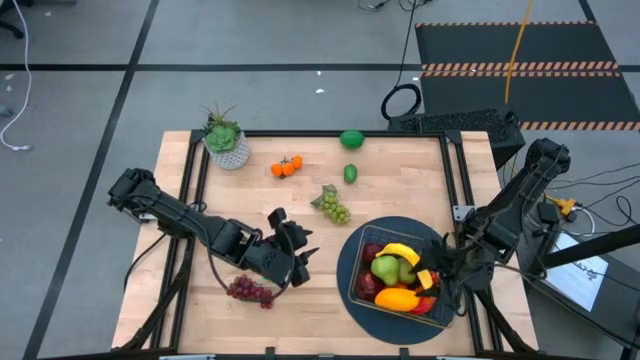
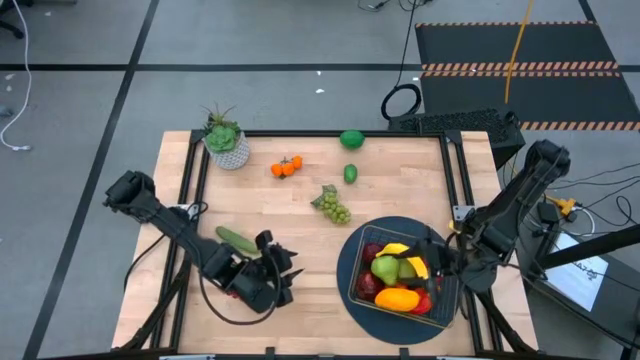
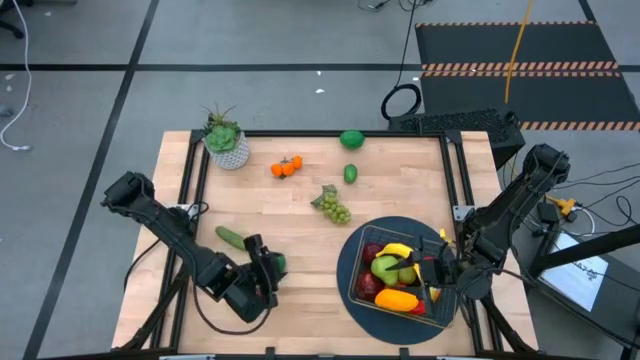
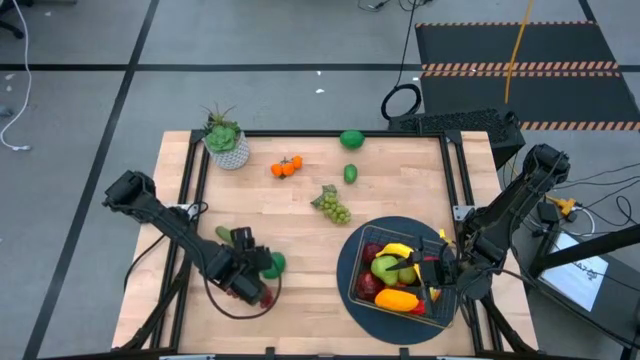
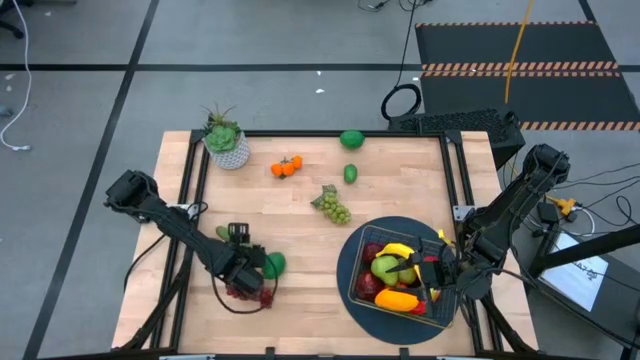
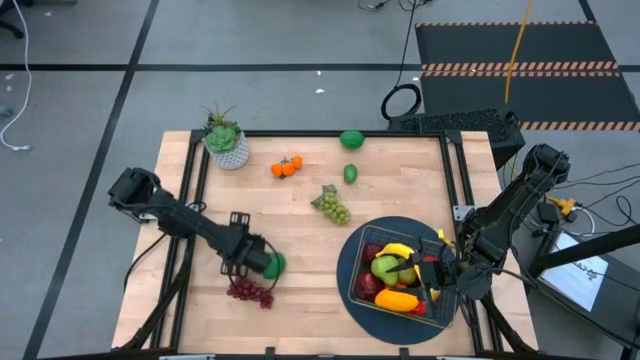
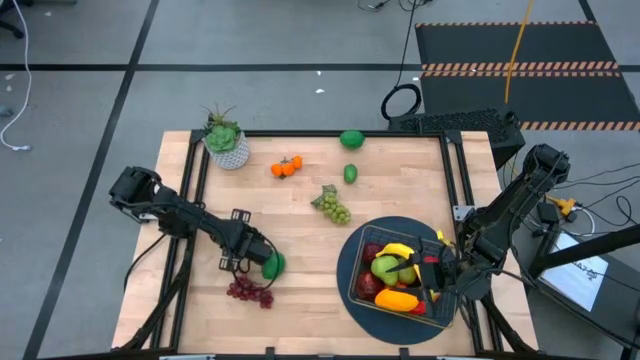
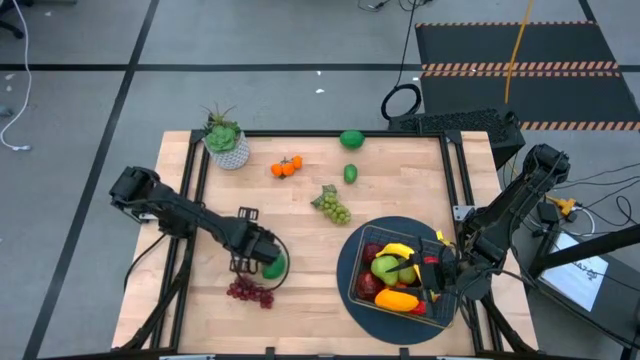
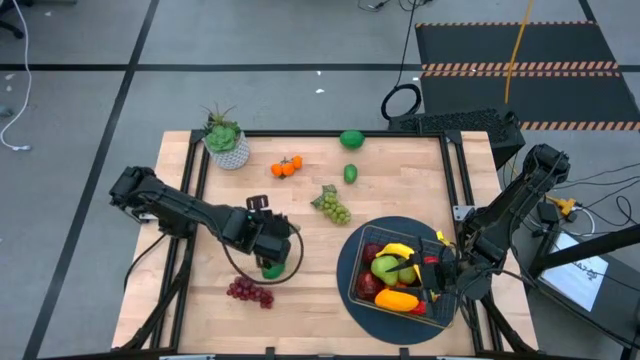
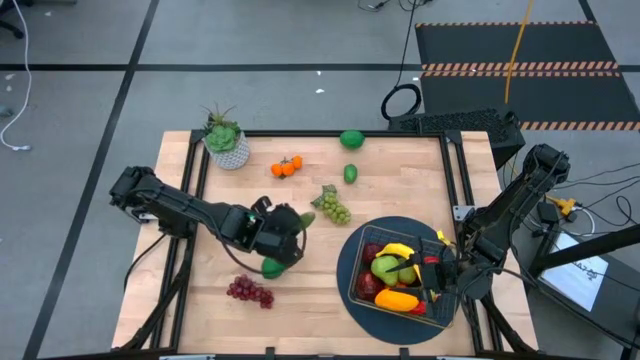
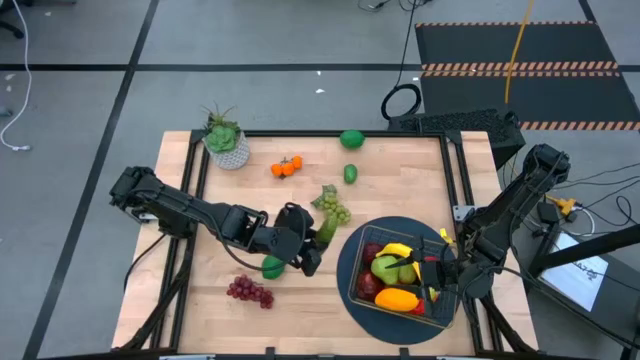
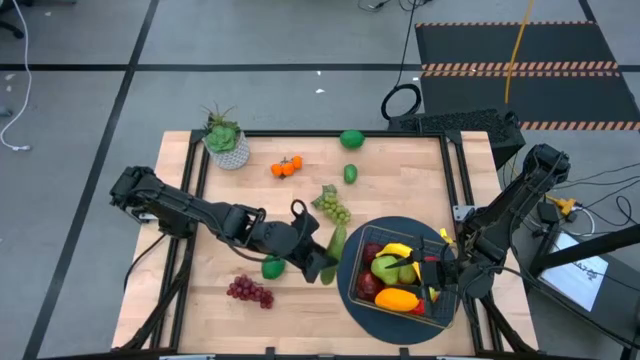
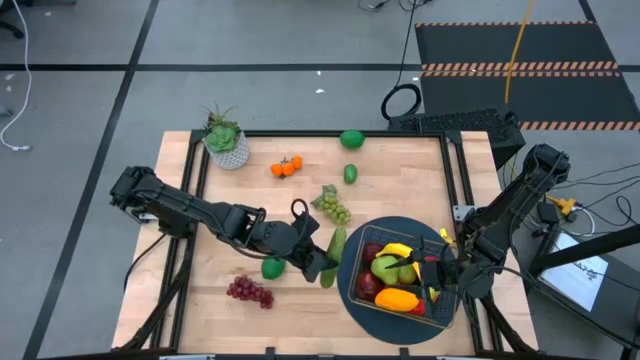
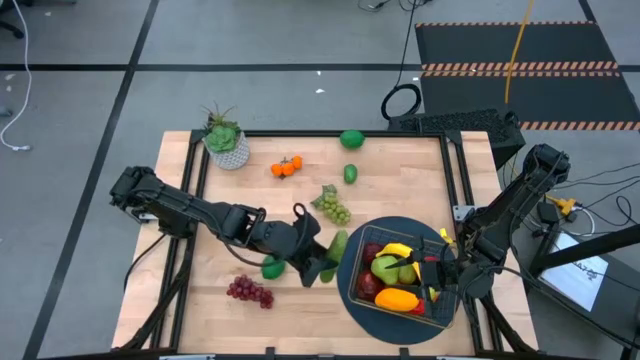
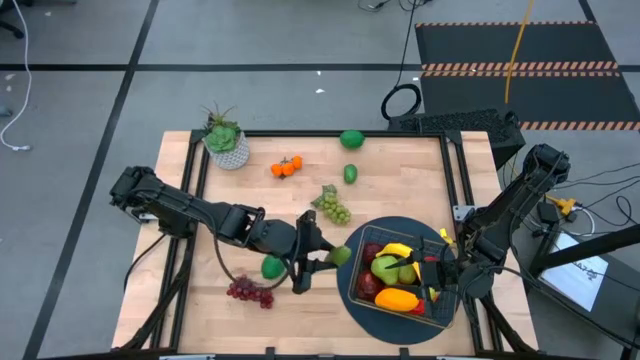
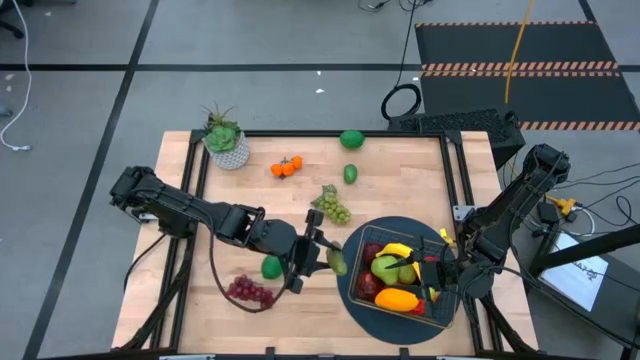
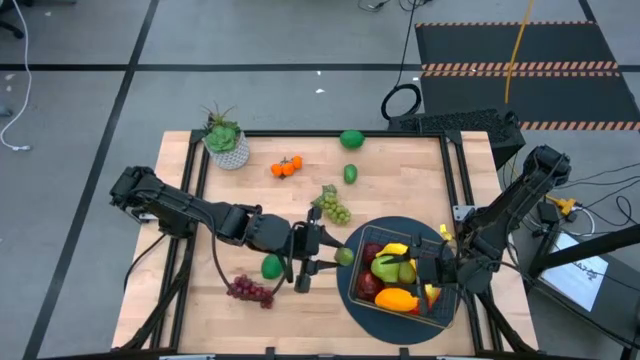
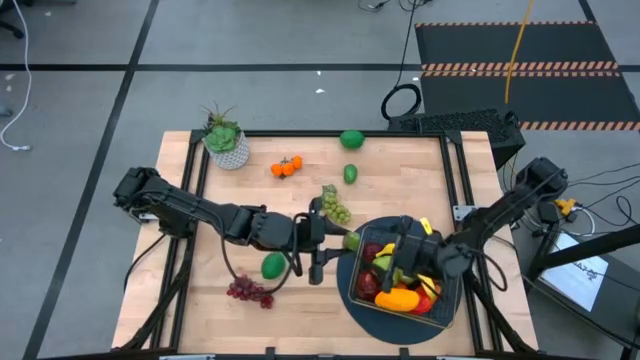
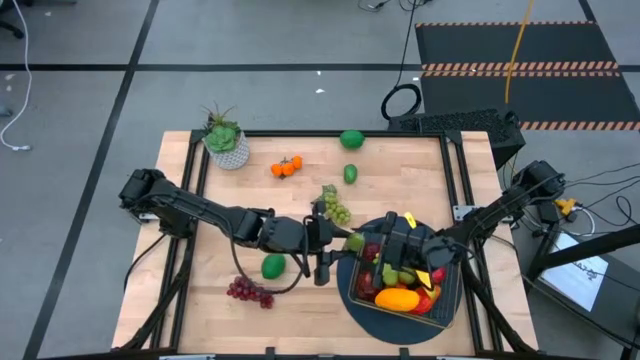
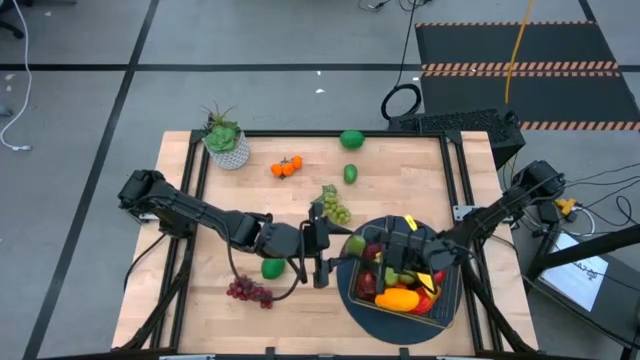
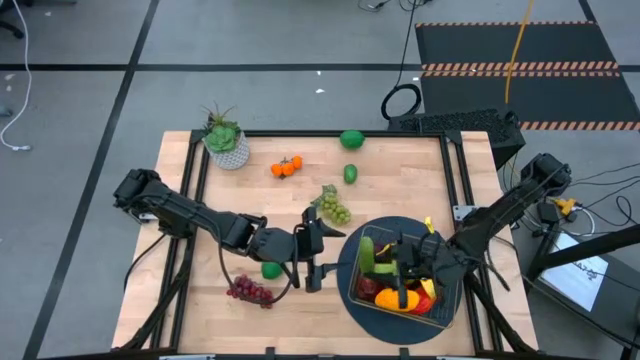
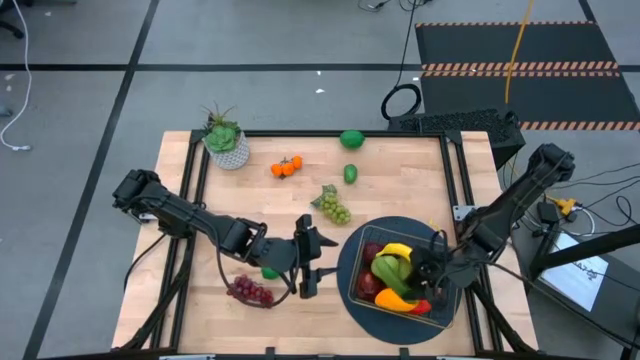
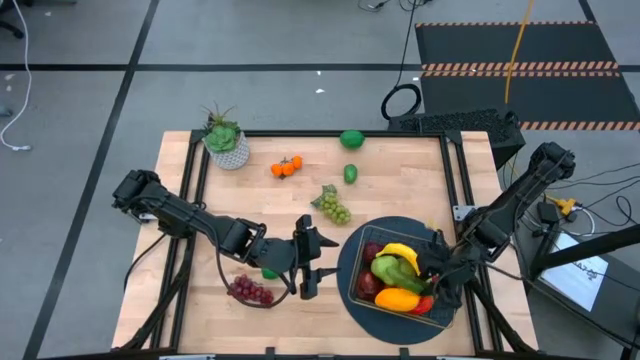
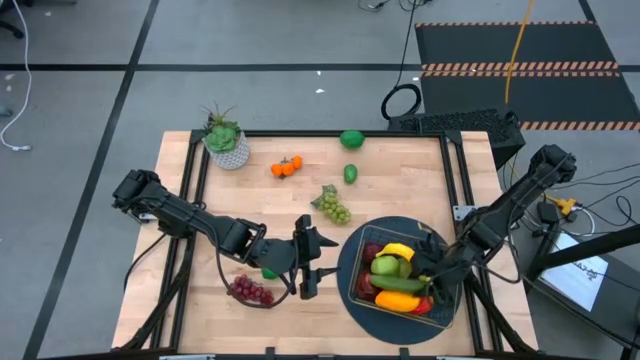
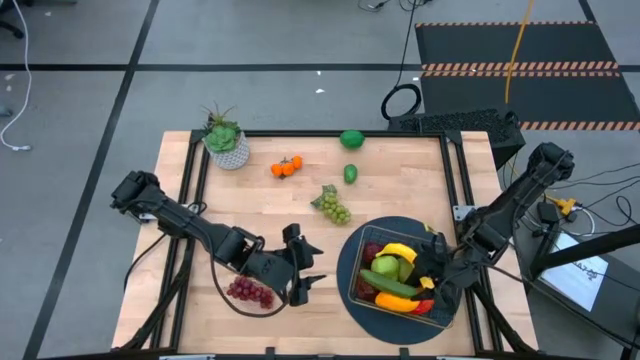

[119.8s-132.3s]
Task: Build produce basket
Put the cucumber into the gold wire basket

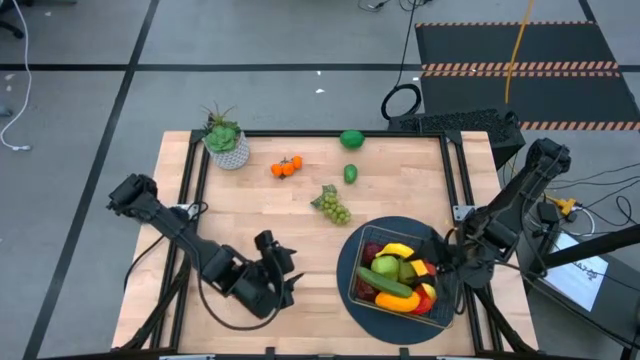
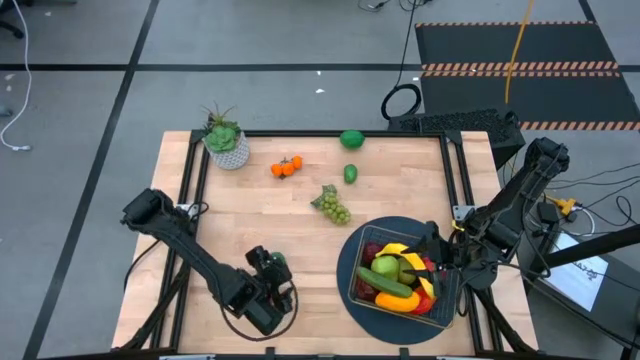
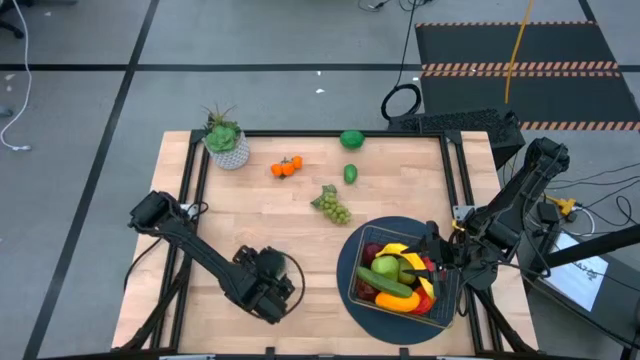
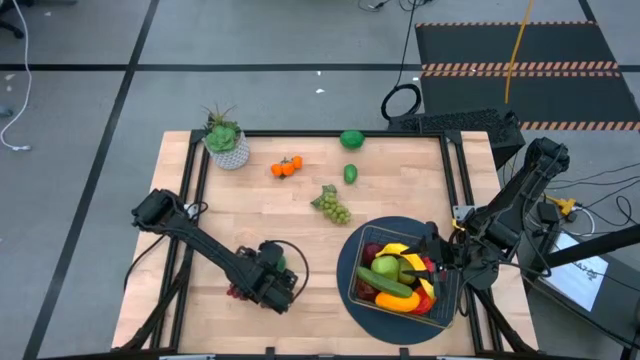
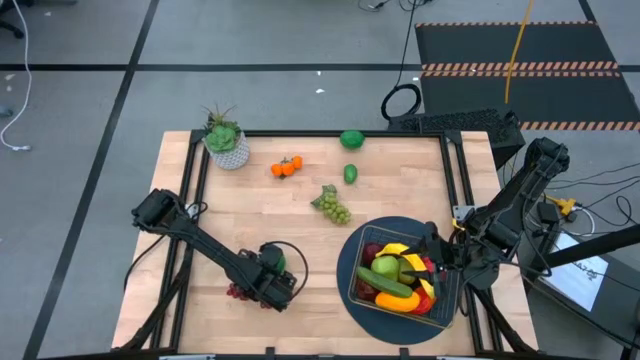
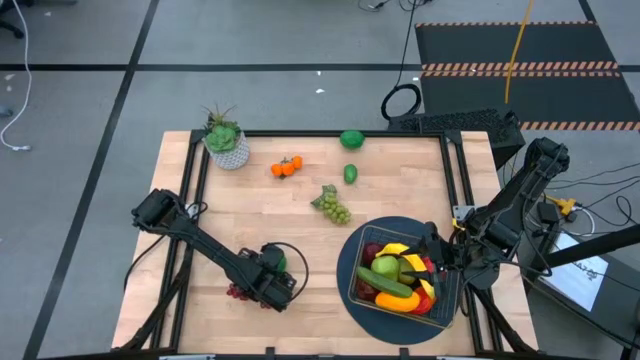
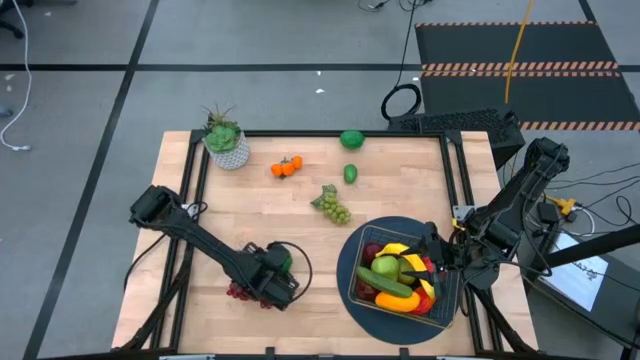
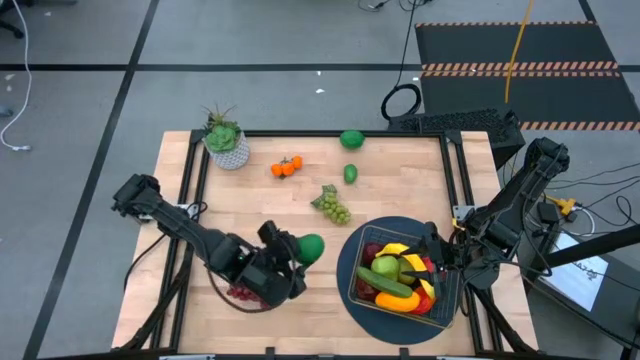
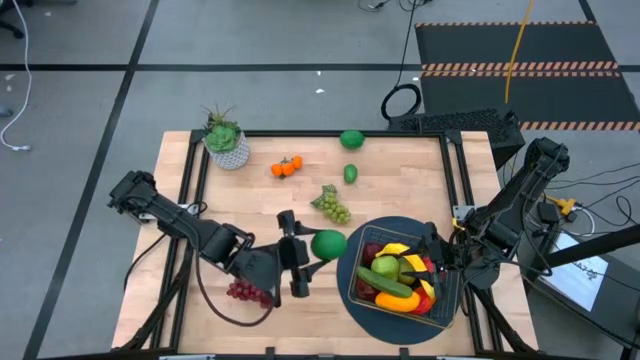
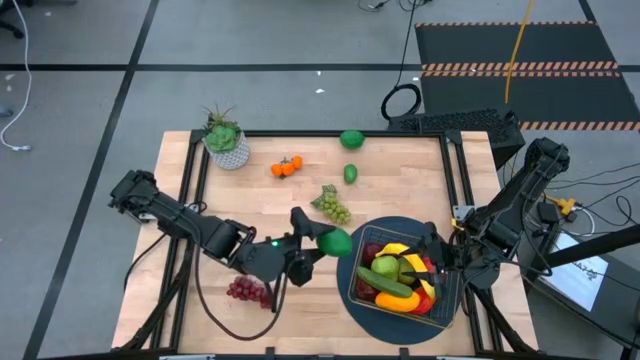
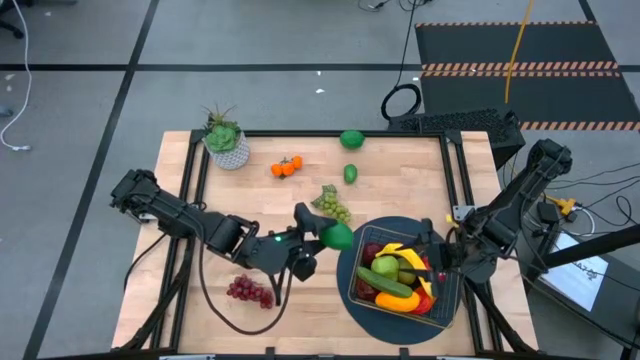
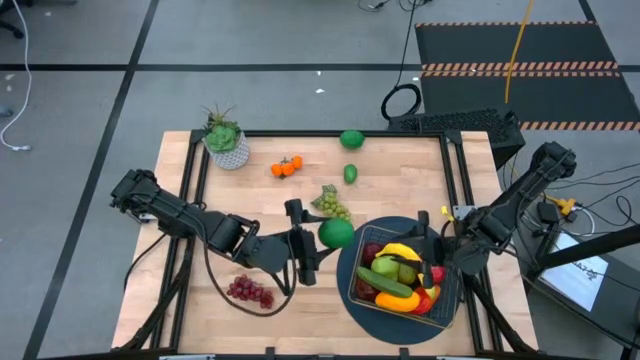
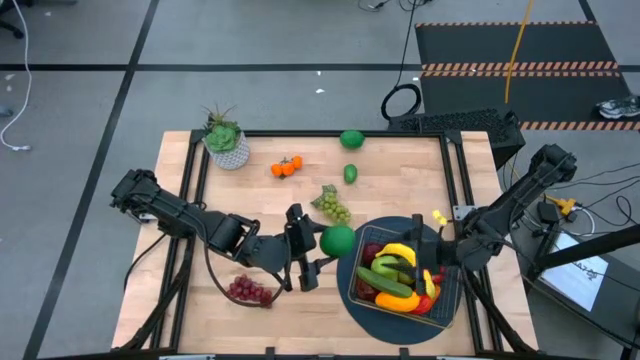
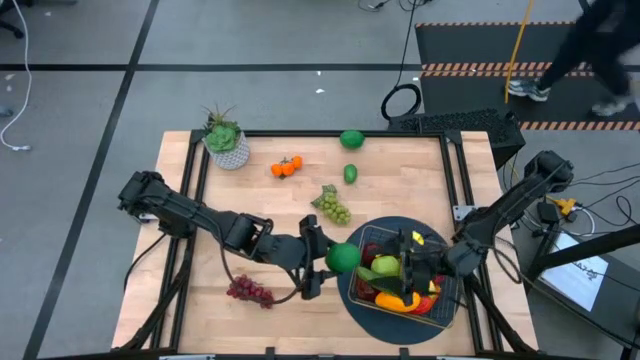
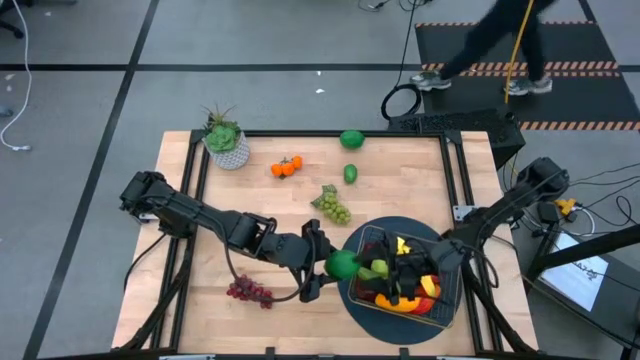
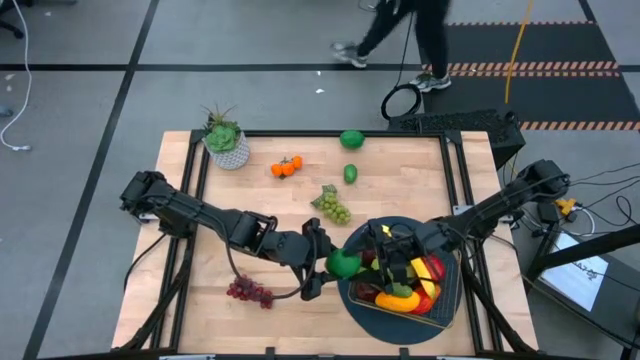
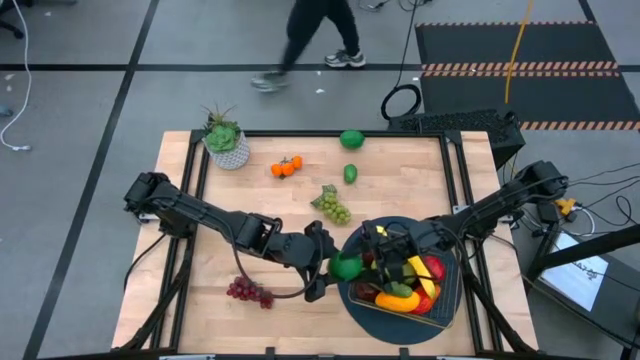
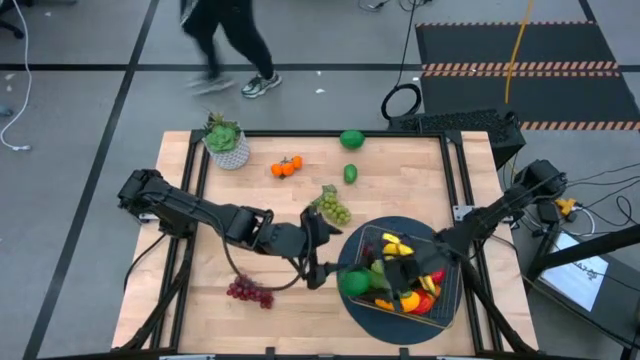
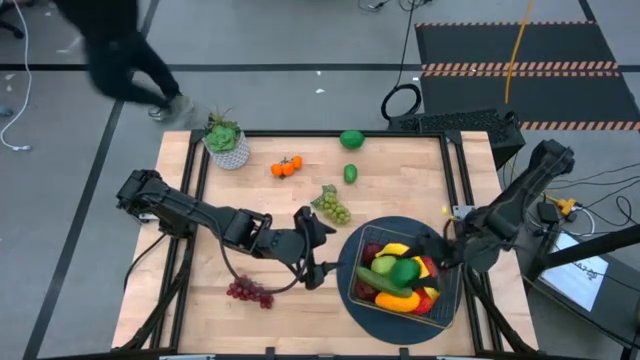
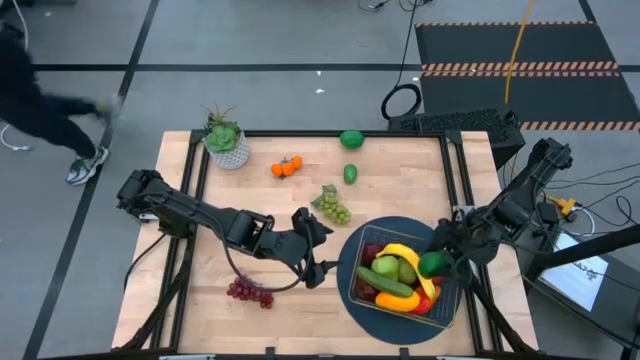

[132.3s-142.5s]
Put the bottom lime into the gold wire basket

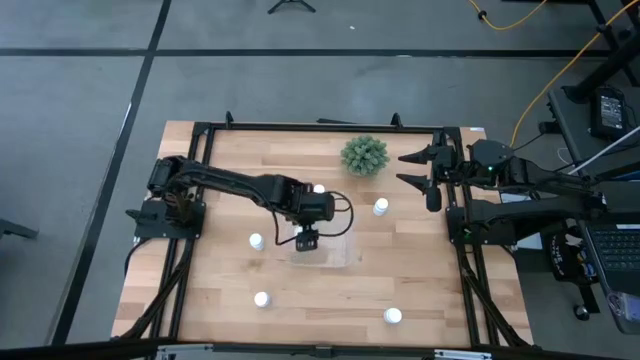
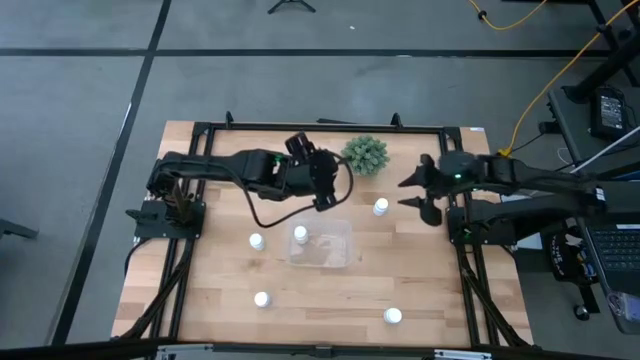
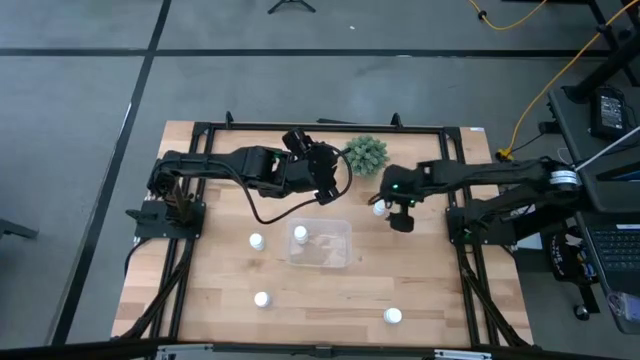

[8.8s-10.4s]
Task: Pick and place pill bottles into a basket
Put the white medicine bottle into the transparent bin
